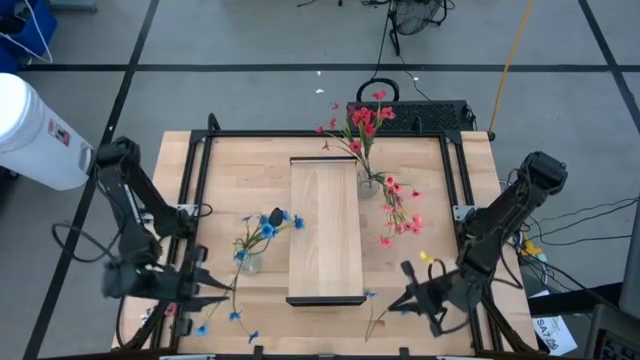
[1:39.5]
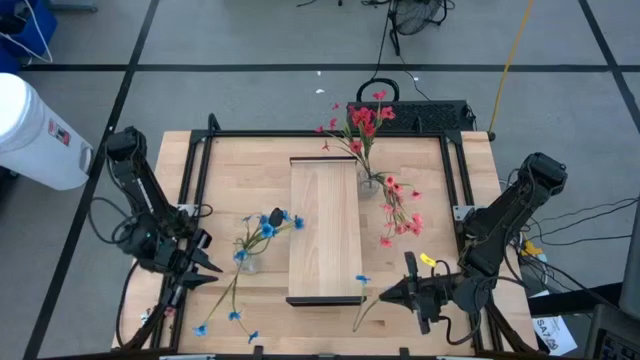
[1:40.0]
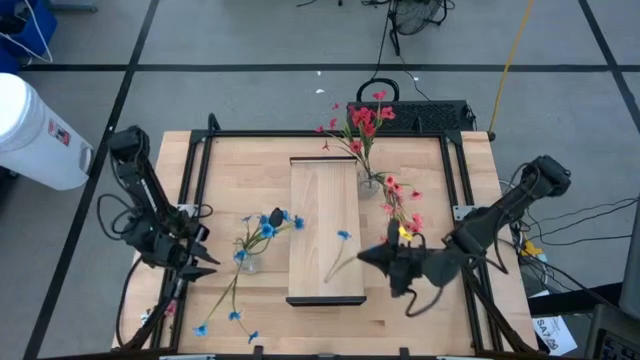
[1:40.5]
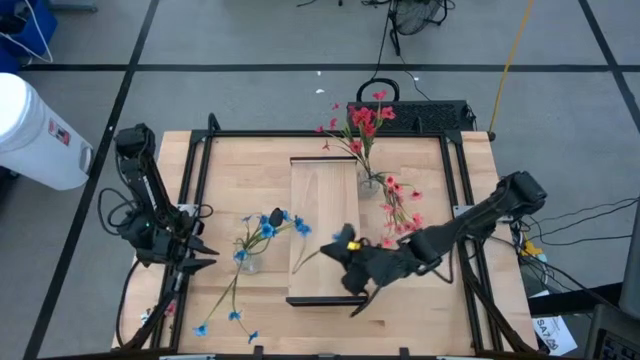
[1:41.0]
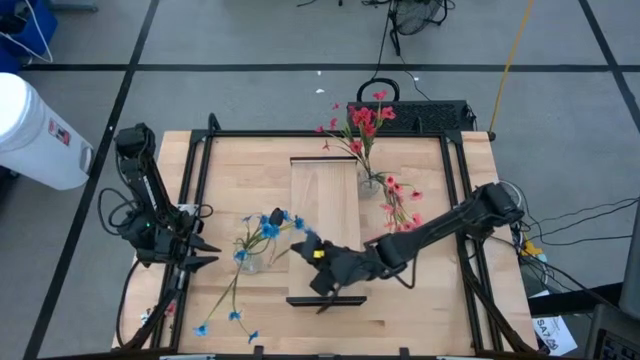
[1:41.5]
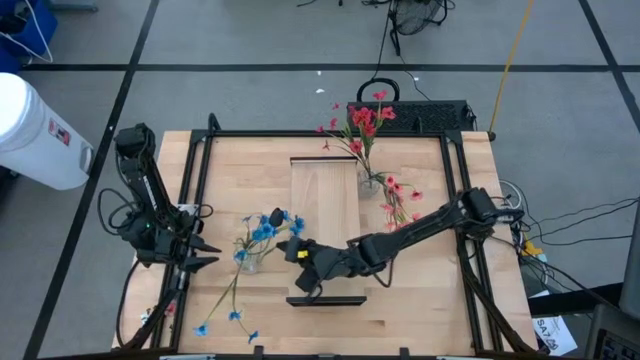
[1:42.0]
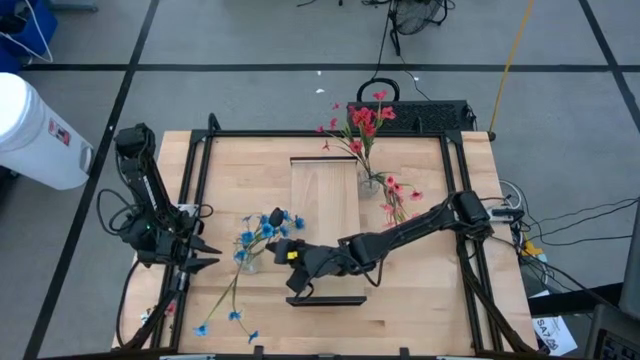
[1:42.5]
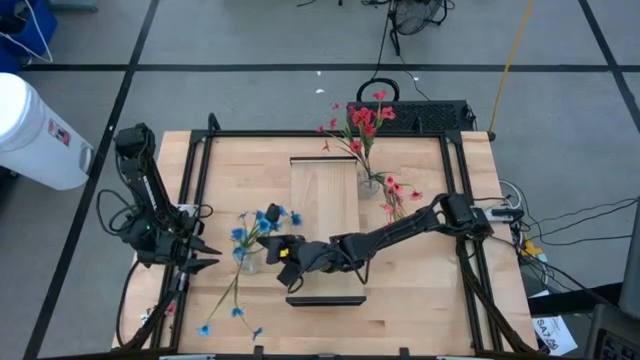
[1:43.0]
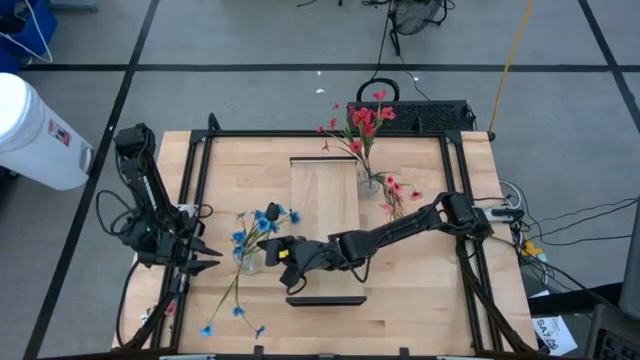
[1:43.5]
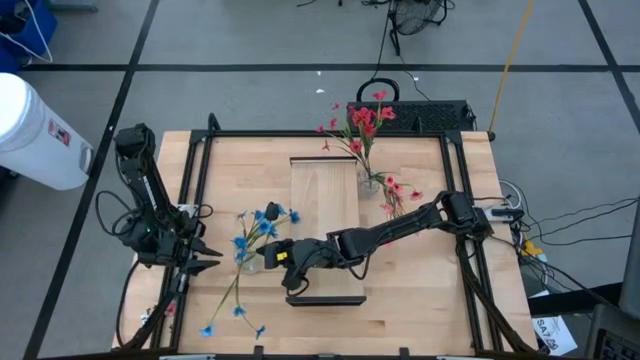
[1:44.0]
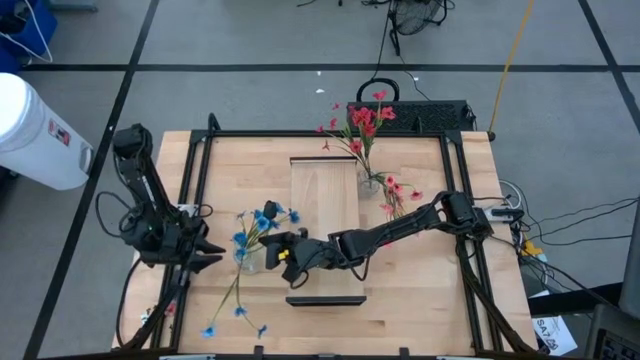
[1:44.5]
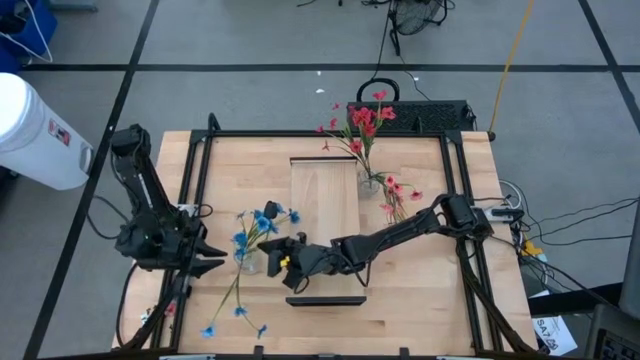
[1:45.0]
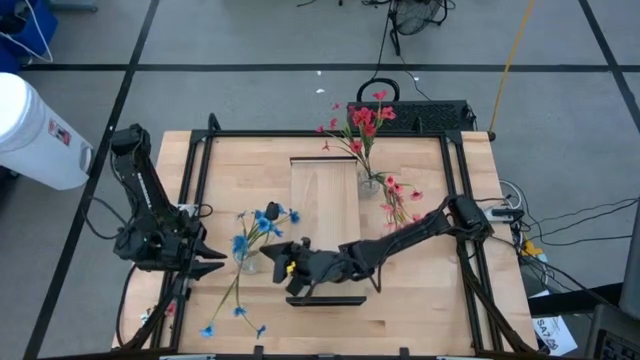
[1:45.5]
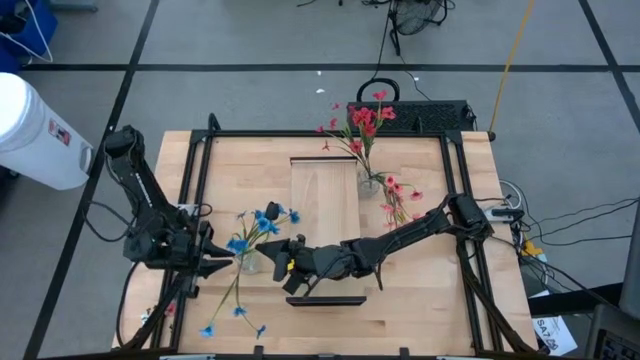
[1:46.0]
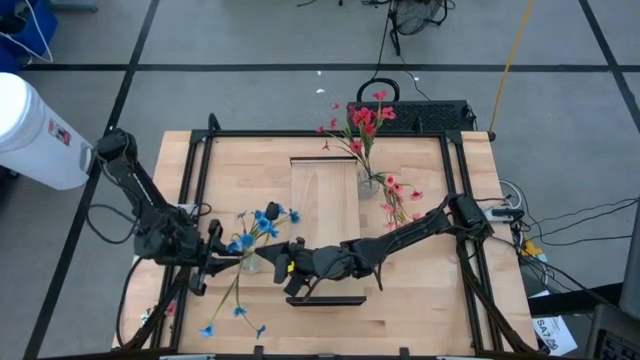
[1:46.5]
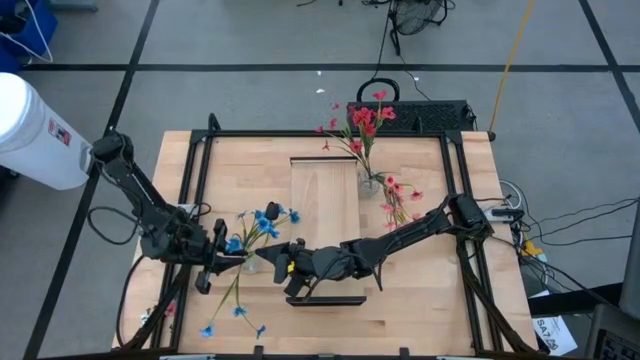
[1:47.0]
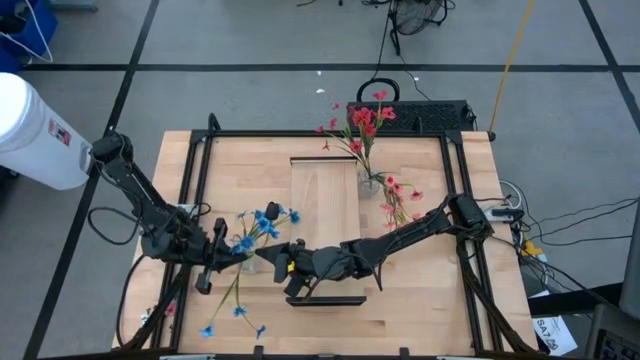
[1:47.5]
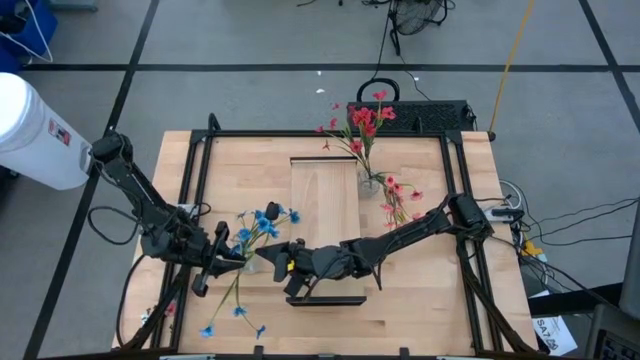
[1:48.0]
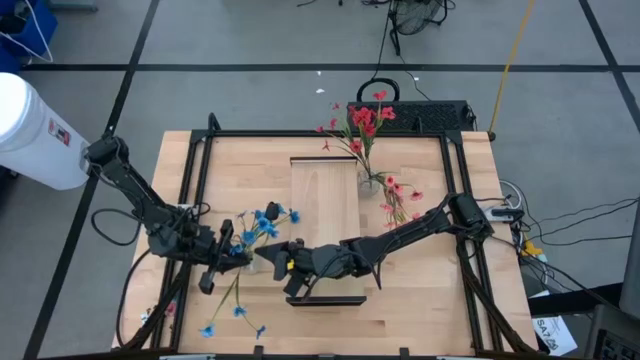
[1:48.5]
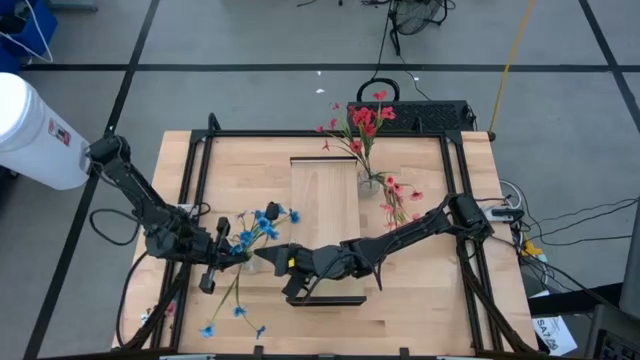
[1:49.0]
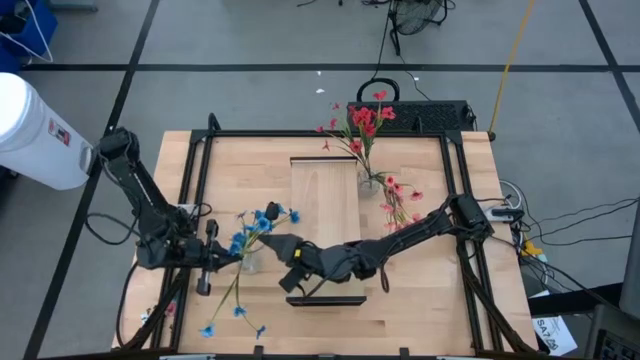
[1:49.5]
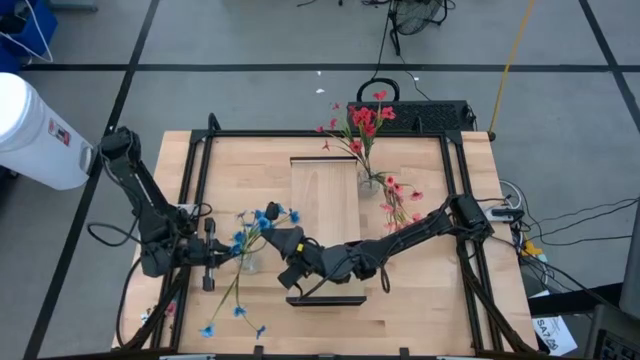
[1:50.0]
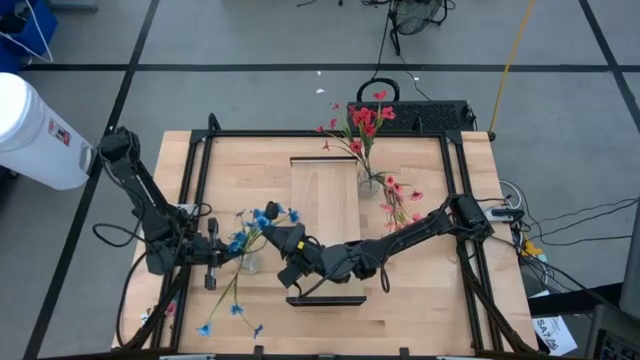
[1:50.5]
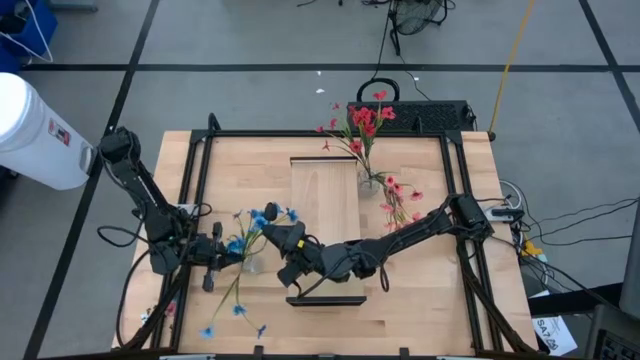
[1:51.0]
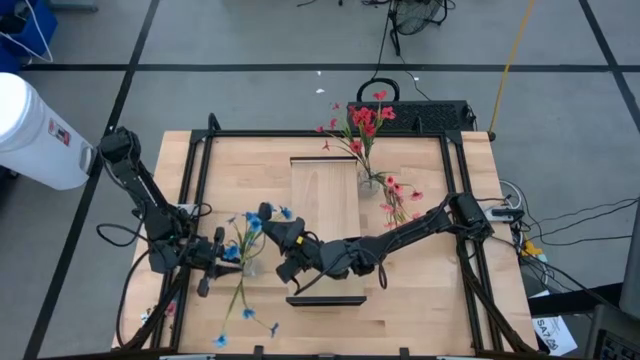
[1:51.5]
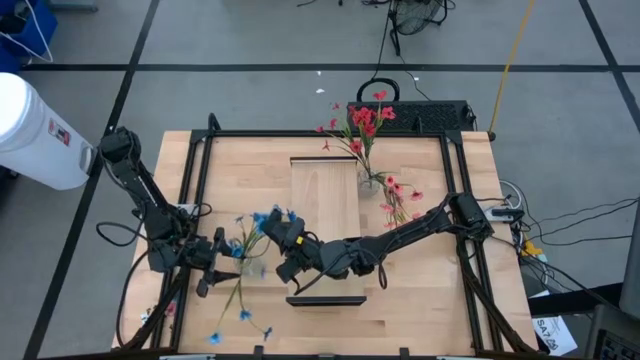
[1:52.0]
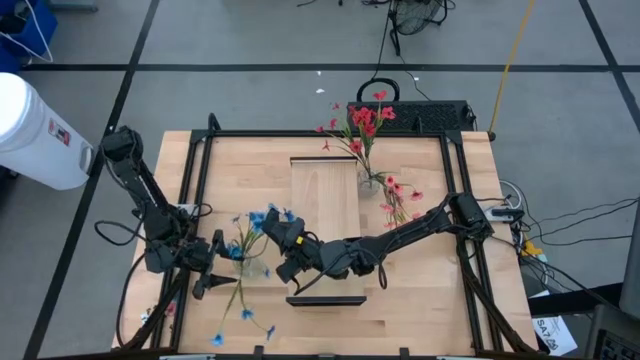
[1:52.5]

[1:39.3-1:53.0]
Task: Pick and place flowers into a vace then onto a shelf
Put the blue flowers into the left transparent vase

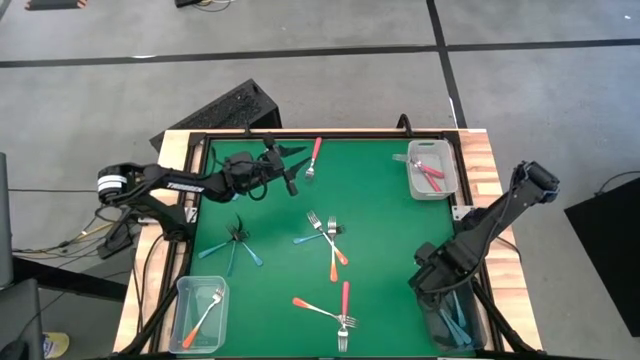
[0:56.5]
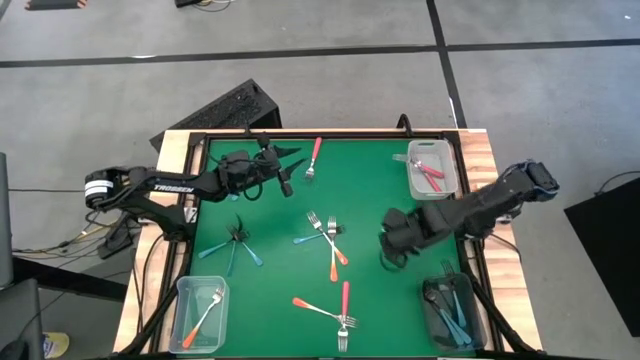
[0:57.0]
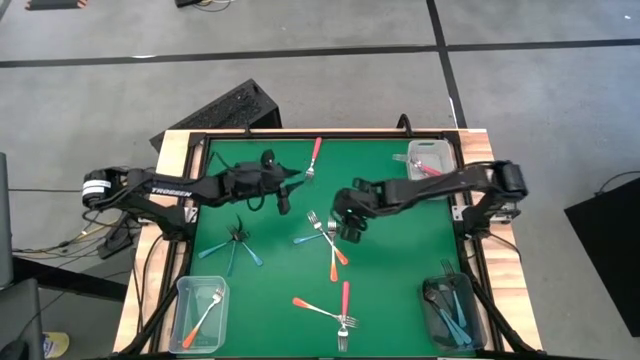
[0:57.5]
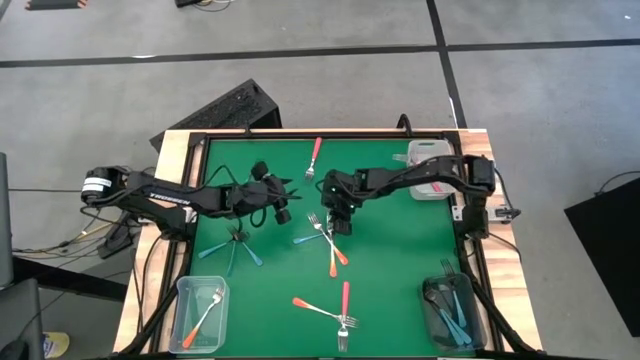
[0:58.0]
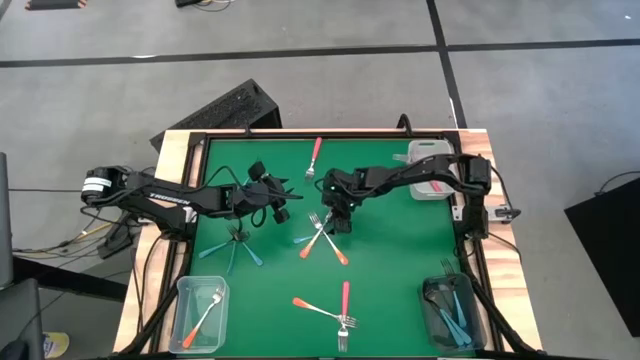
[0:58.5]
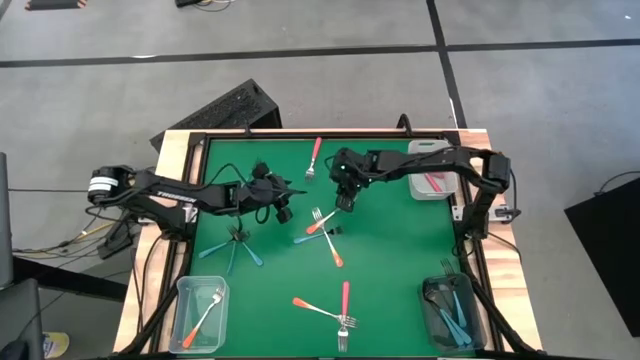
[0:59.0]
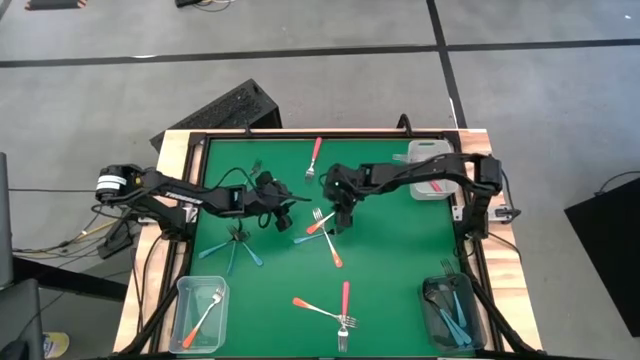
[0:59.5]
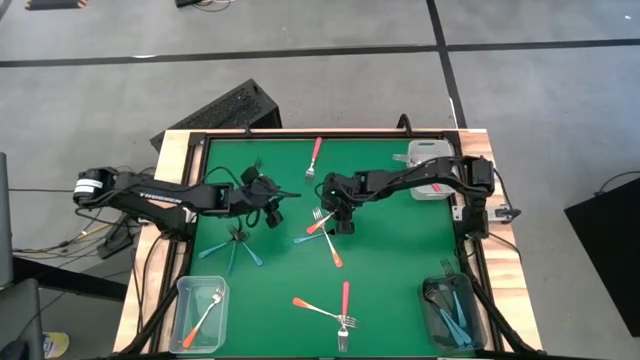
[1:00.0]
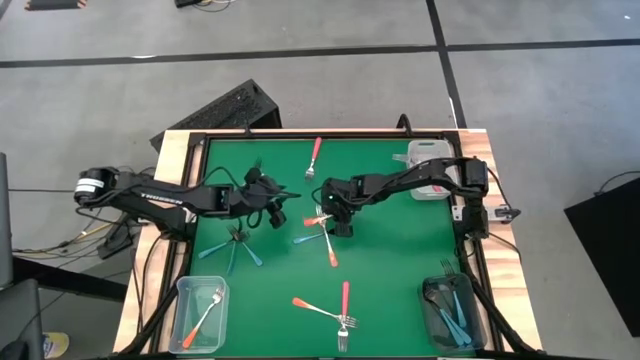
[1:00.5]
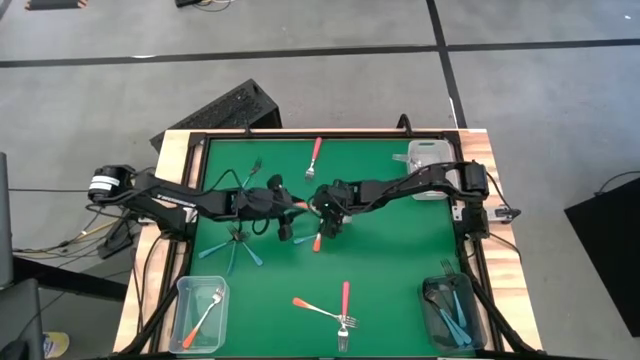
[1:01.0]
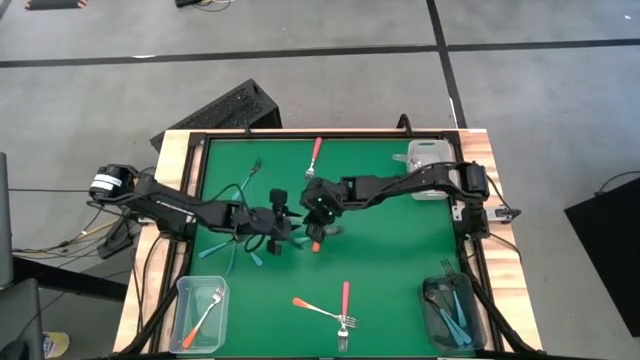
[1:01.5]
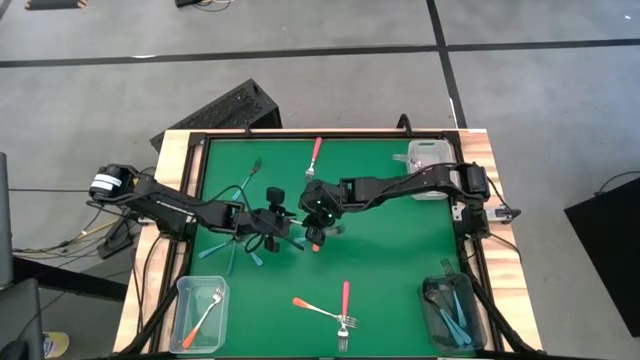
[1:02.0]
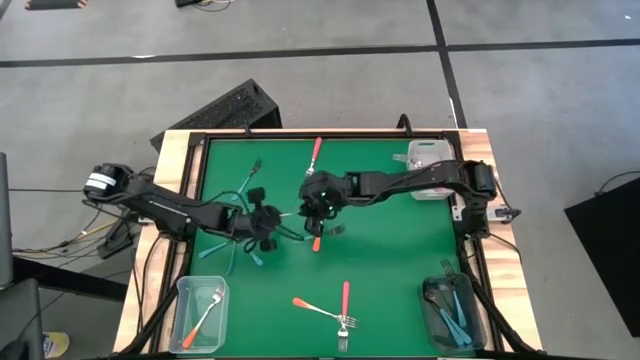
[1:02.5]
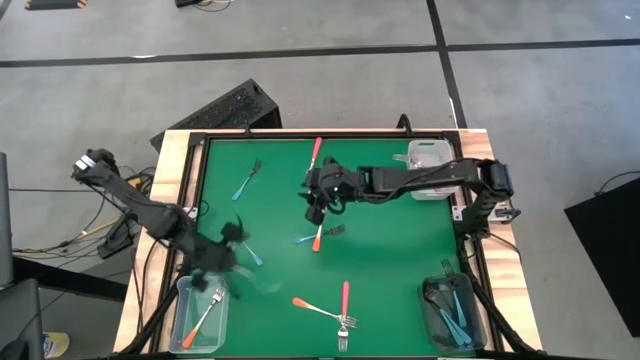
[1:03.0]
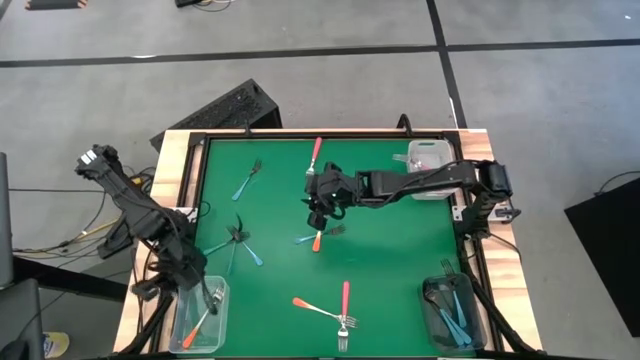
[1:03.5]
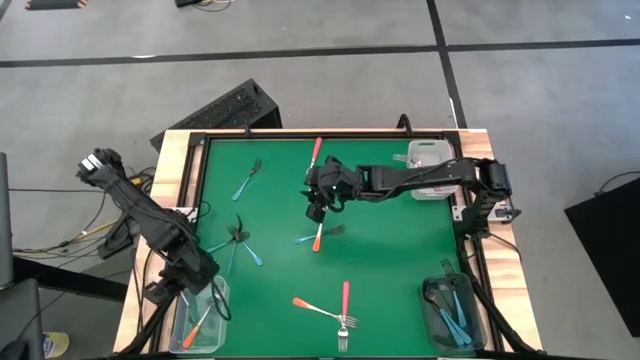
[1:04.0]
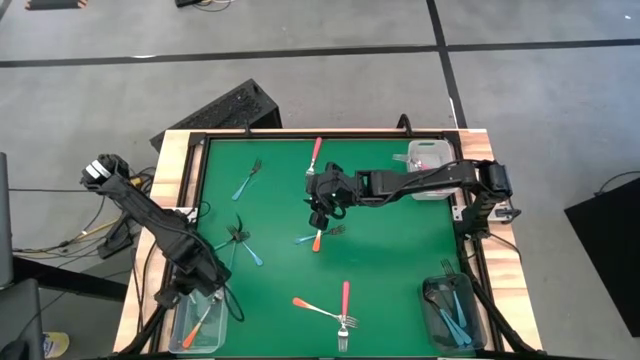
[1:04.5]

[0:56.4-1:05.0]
Task: Sort silverware by color (type)
Put the orange fork into the transparent bin
